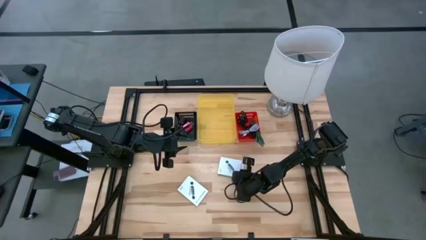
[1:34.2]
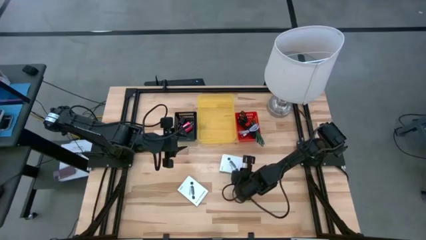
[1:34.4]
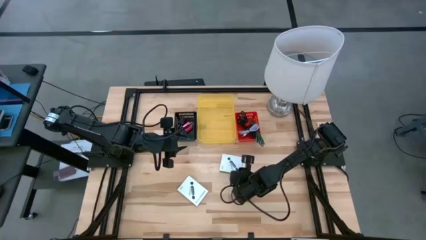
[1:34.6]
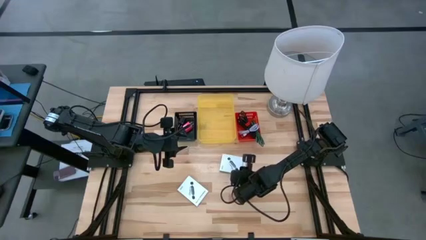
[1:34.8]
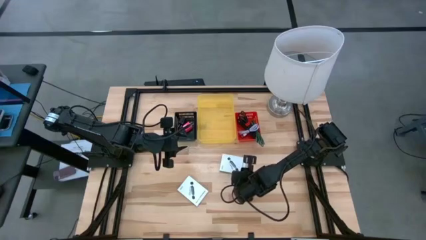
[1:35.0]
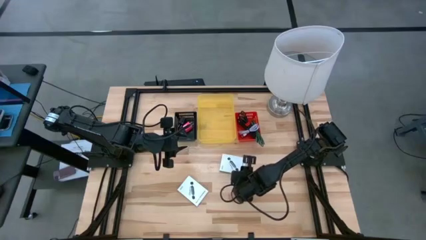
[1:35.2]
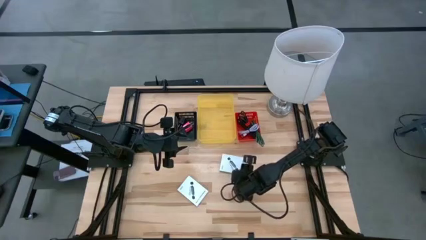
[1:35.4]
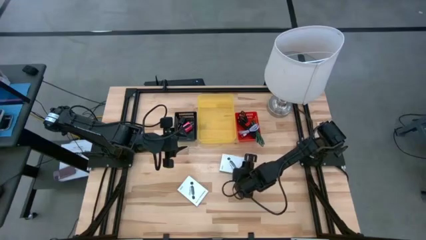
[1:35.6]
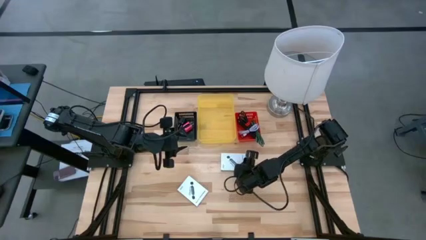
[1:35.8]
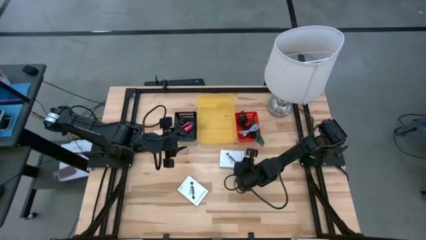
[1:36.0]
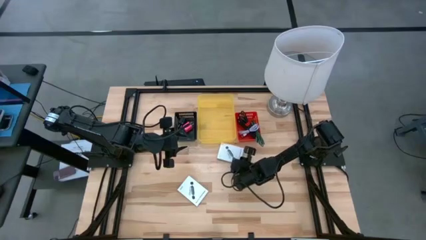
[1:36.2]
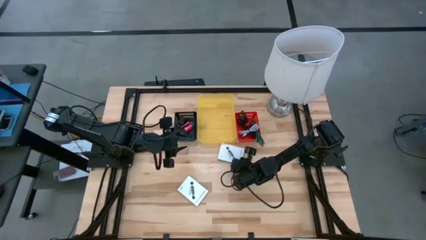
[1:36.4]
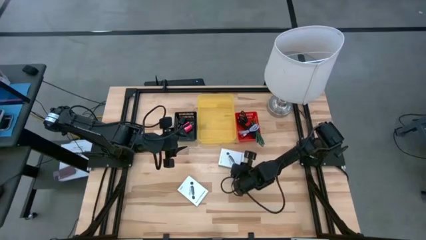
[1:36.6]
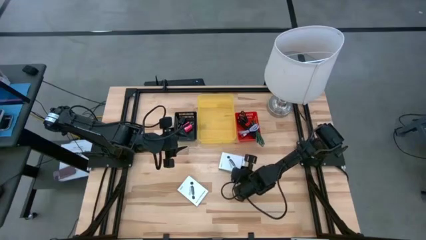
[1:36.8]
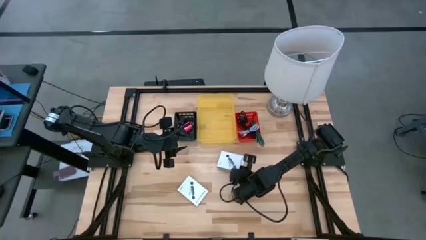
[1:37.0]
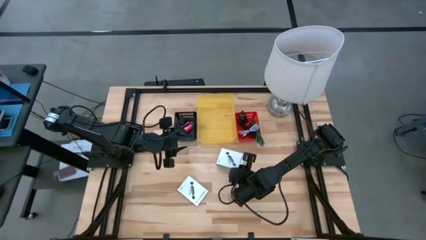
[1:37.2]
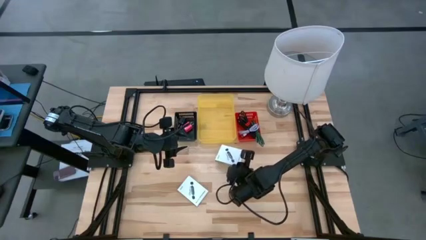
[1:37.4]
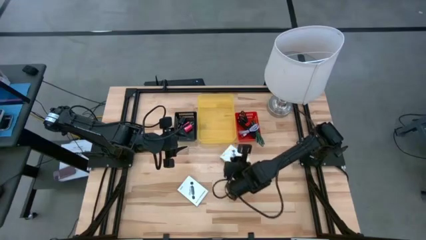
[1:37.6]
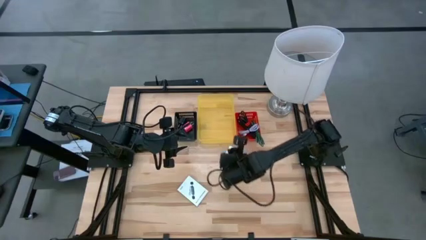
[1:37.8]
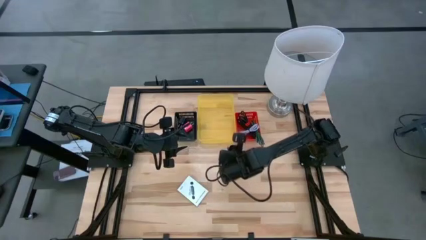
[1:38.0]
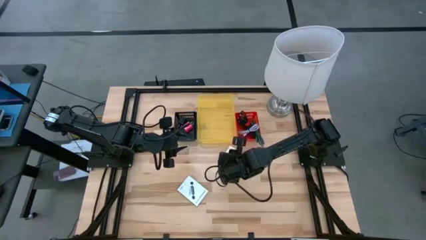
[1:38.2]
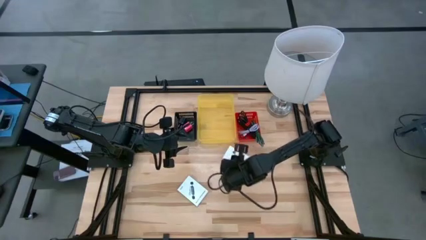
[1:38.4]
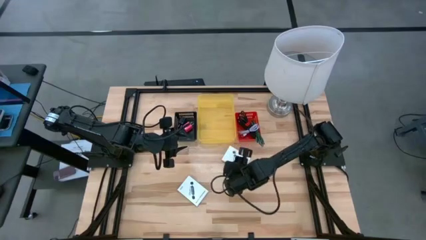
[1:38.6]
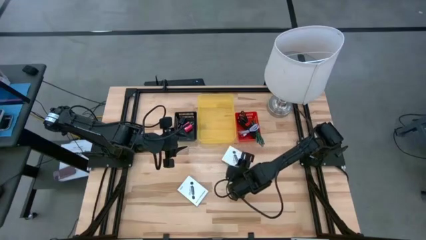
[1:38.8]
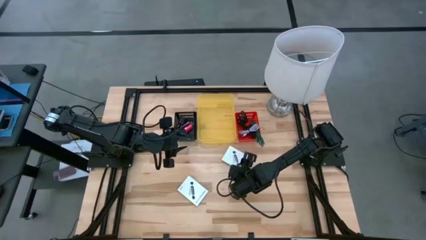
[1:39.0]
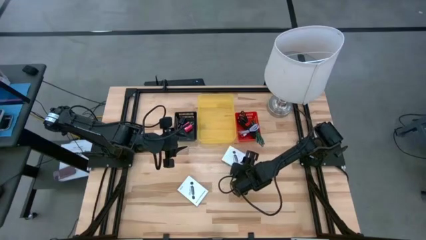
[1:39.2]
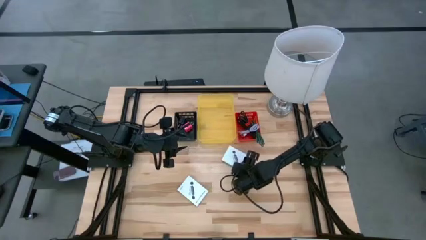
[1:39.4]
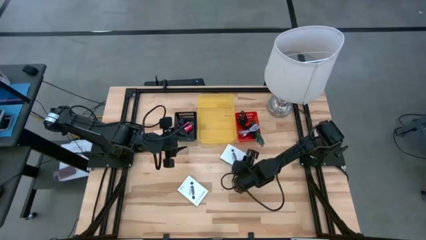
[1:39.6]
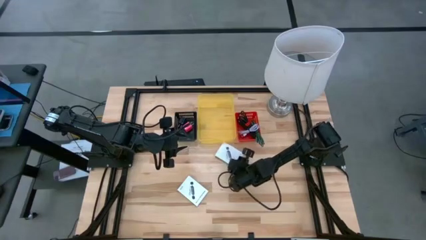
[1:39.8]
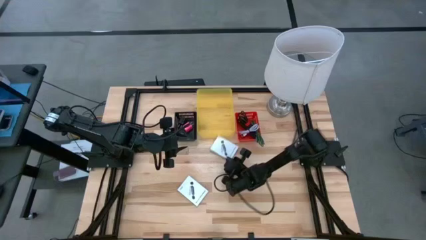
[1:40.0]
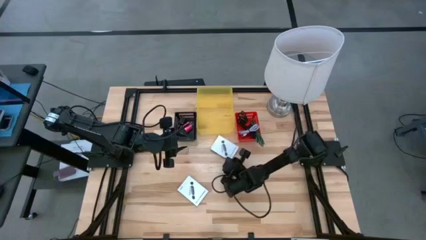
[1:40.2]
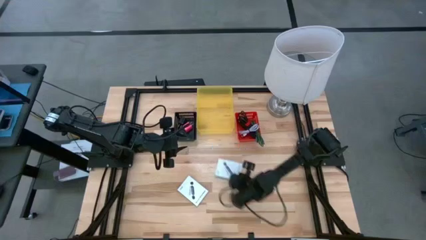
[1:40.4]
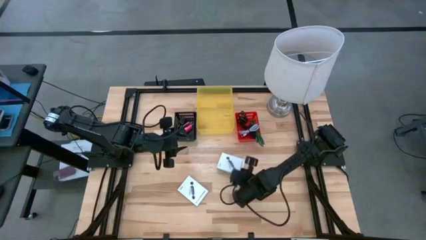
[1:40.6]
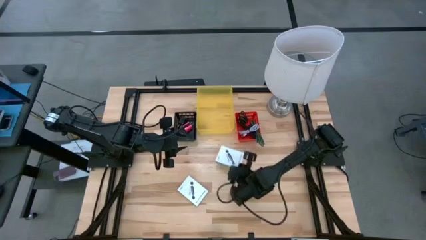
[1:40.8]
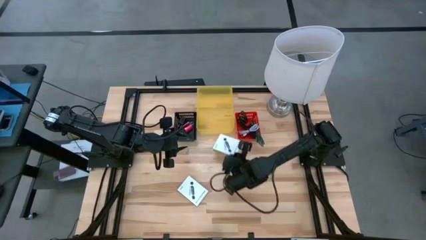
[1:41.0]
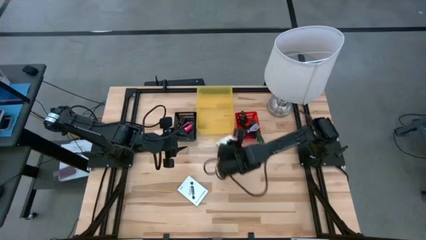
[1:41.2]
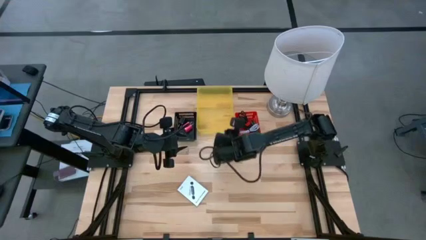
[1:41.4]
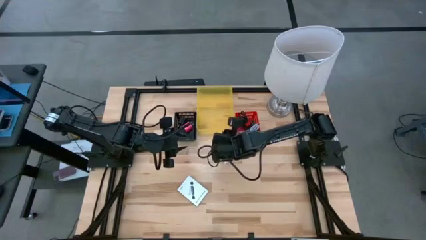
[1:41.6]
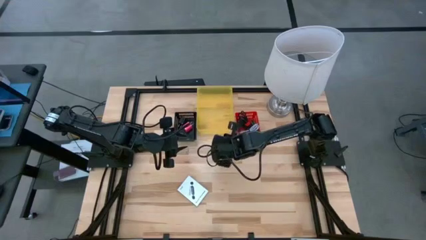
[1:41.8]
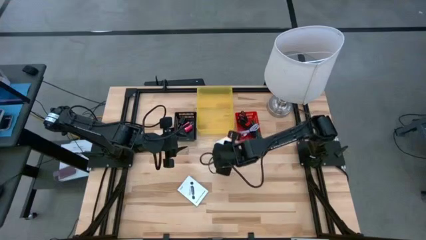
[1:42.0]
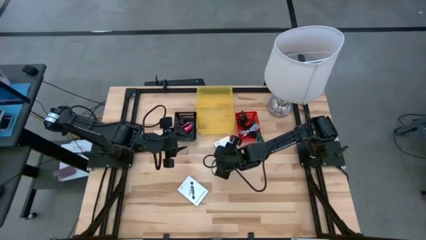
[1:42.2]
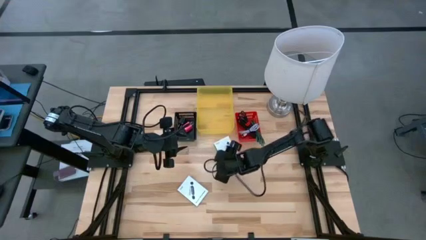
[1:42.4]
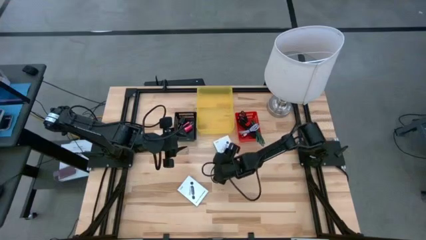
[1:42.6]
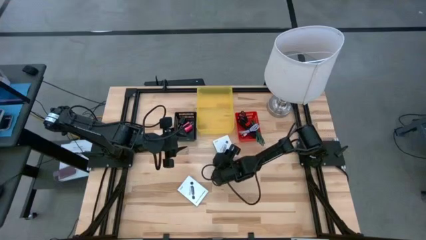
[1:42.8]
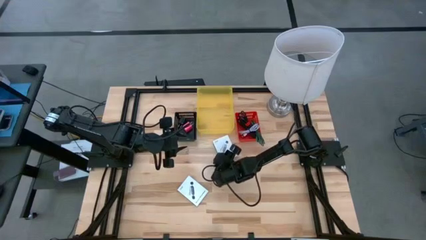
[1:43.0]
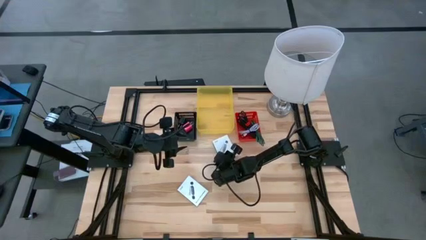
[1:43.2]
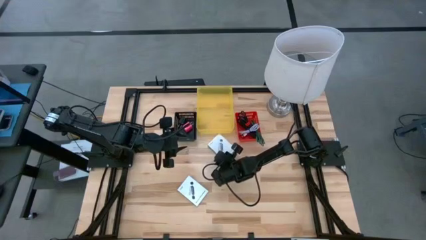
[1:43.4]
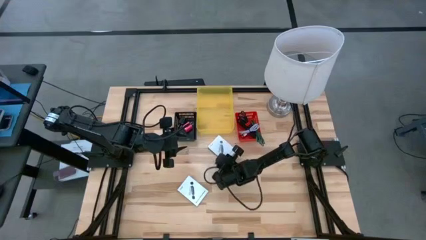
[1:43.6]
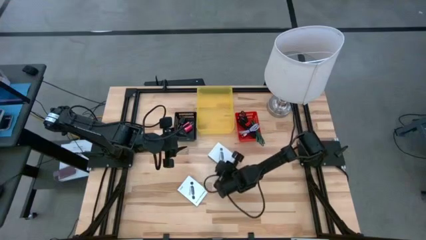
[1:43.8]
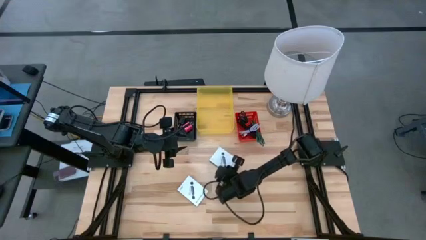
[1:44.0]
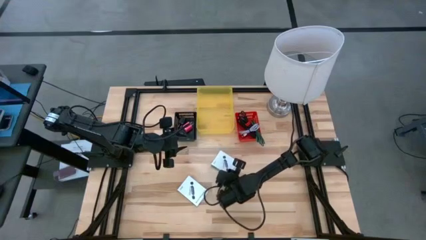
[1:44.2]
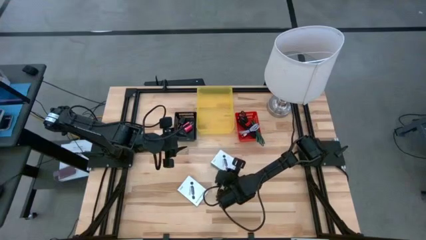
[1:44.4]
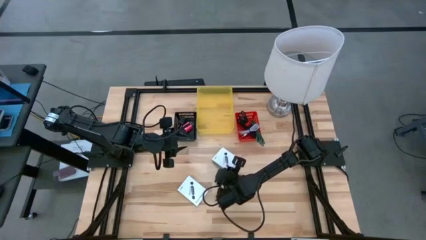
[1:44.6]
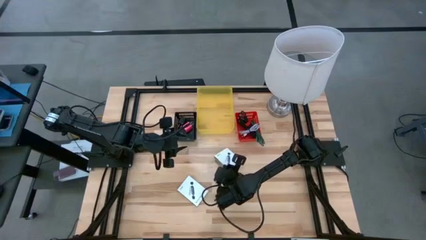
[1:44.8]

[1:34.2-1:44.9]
Task: Pick and place items into bin
Put the top card reader box into the yellow bin

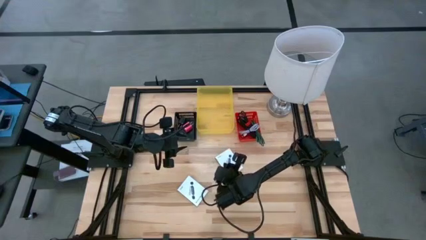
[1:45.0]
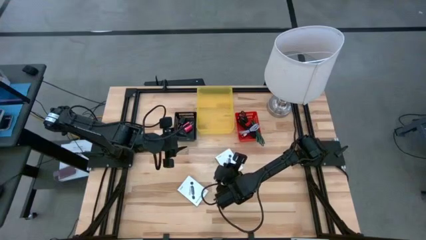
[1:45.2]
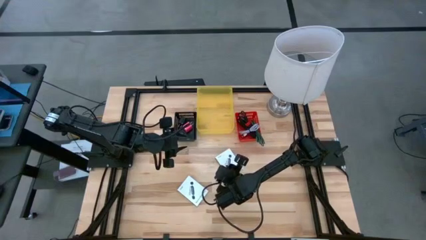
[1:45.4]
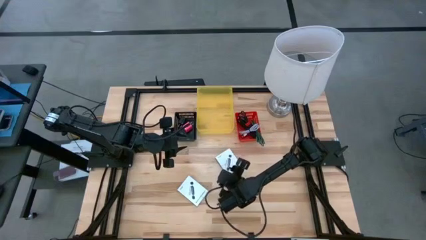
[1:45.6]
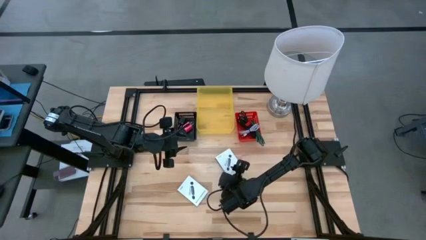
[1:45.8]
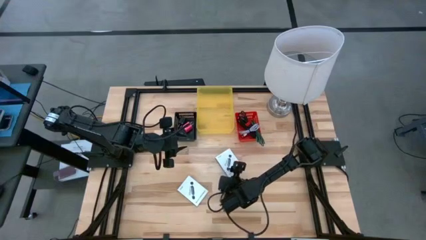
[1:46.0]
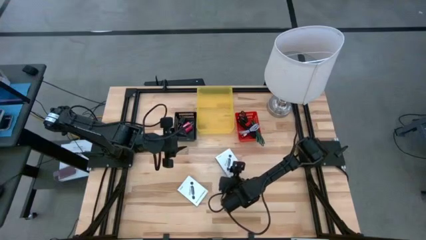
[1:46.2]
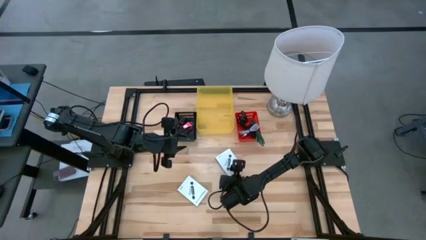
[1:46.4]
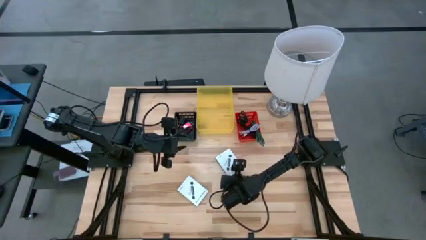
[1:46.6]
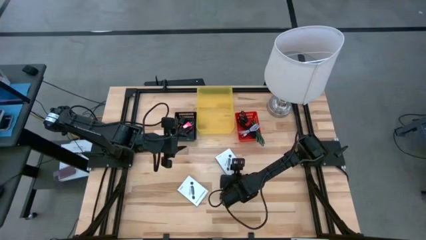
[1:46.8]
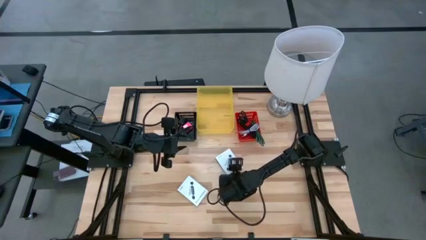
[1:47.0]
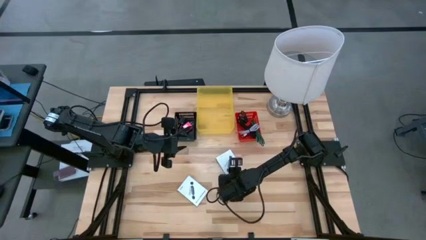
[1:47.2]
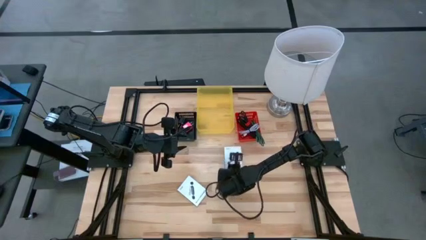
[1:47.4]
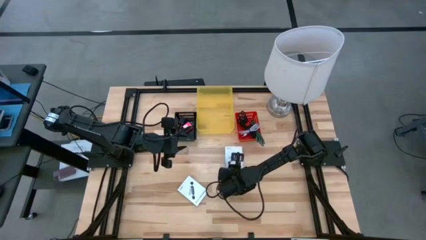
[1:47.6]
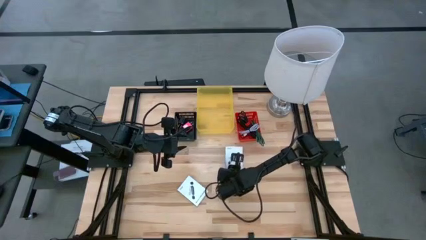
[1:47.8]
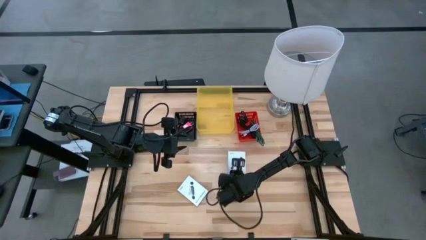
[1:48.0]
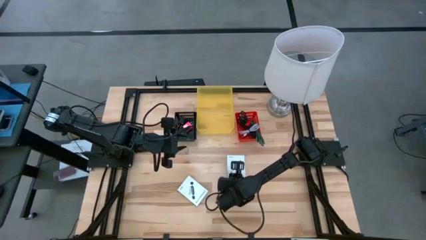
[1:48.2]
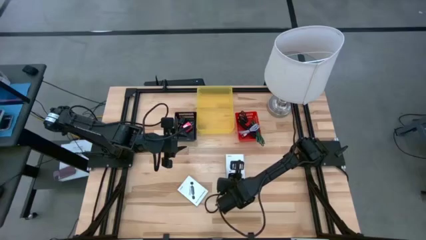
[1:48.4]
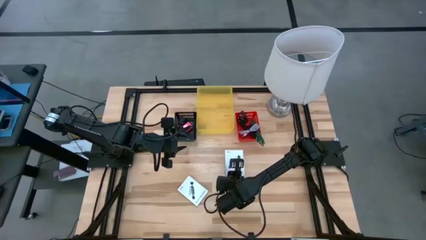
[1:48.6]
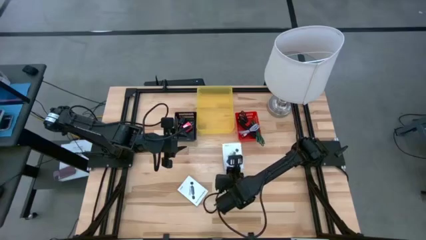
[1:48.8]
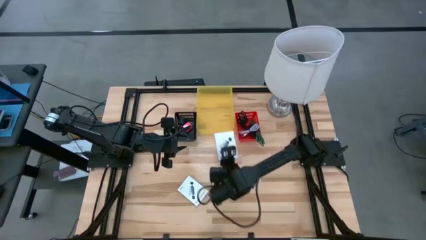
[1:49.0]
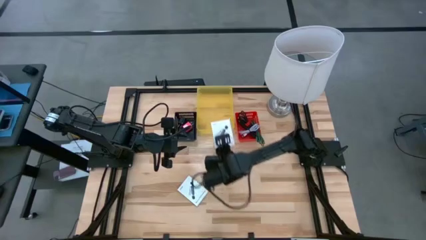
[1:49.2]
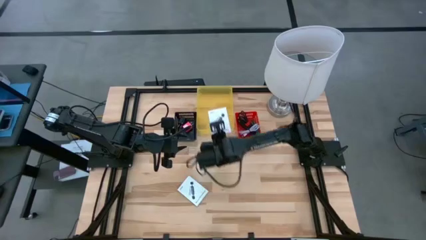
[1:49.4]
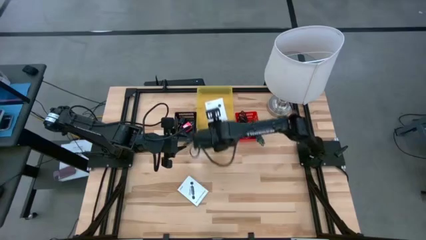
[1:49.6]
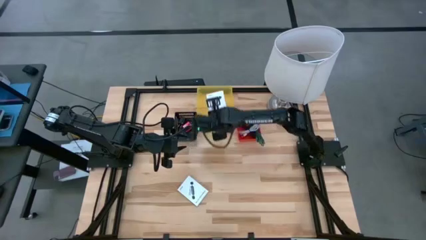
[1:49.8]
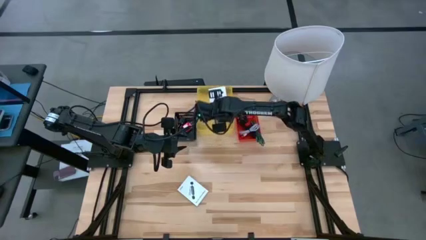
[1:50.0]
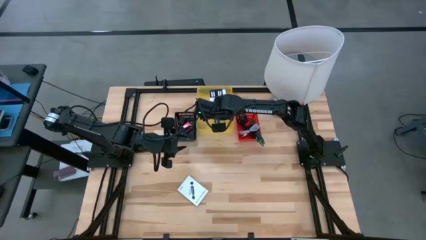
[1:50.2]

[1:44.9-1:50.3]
Put the top white card reader box into the yellow bin
